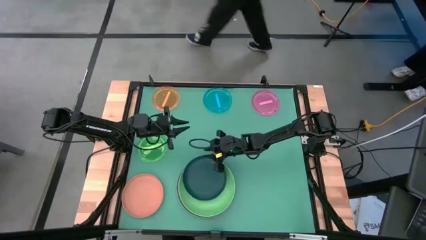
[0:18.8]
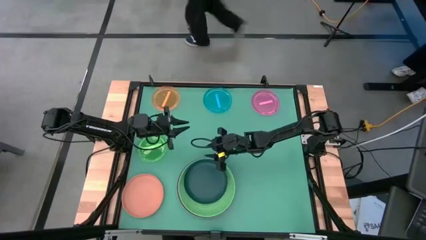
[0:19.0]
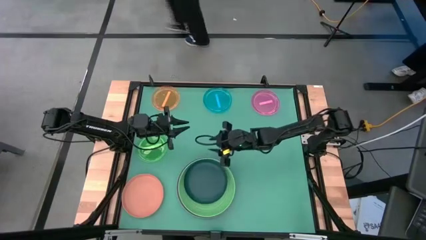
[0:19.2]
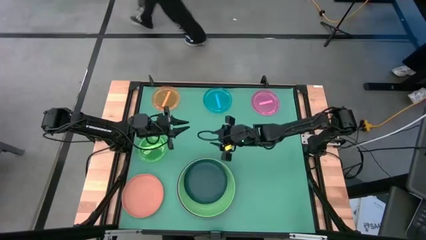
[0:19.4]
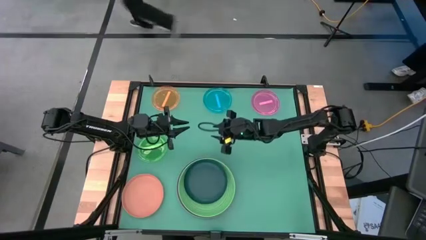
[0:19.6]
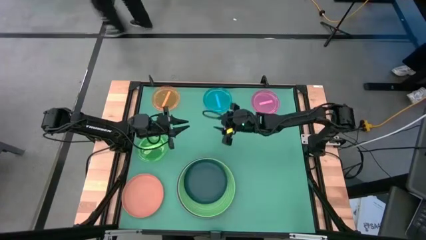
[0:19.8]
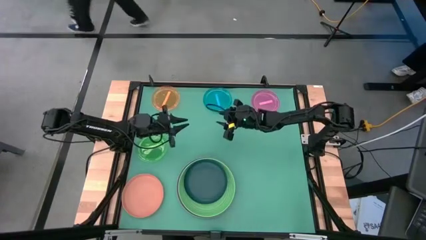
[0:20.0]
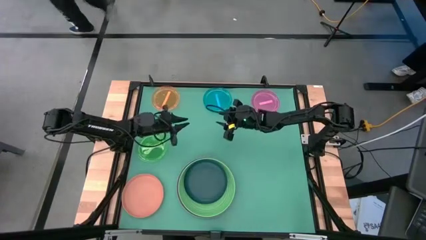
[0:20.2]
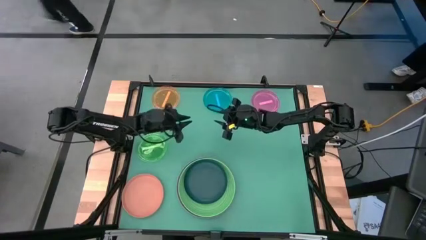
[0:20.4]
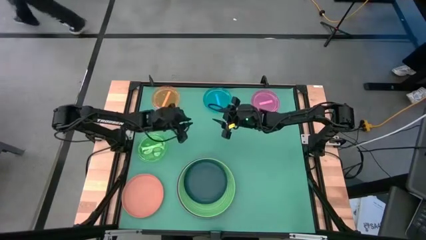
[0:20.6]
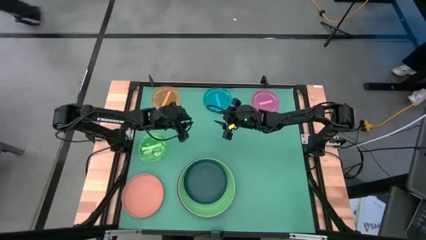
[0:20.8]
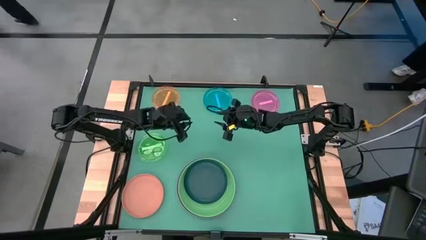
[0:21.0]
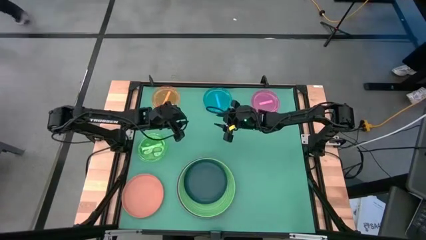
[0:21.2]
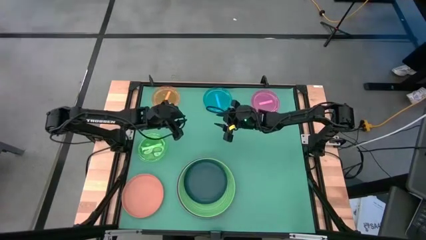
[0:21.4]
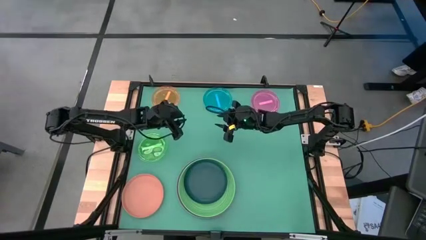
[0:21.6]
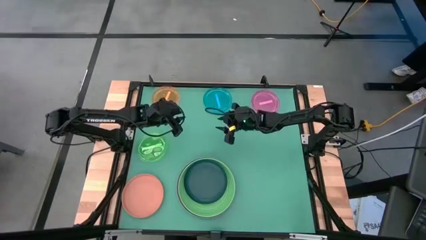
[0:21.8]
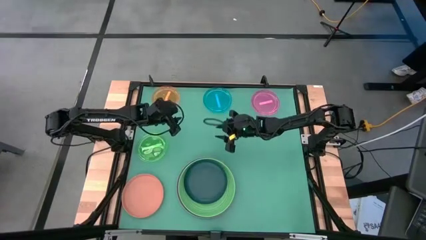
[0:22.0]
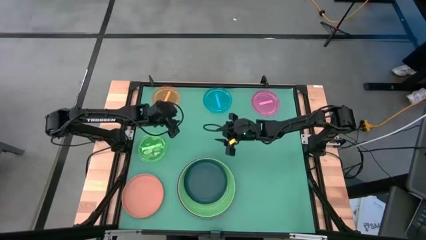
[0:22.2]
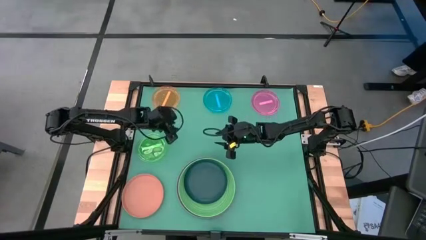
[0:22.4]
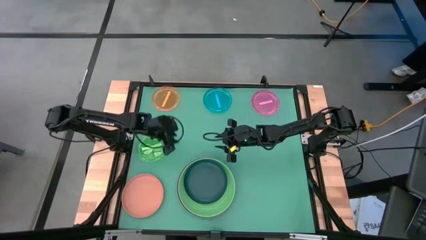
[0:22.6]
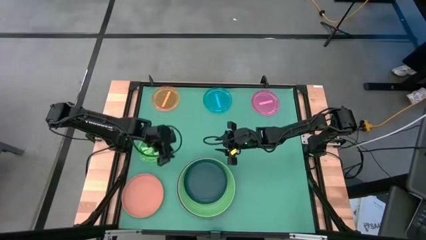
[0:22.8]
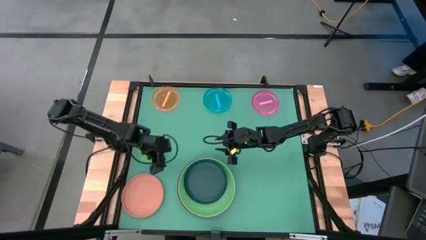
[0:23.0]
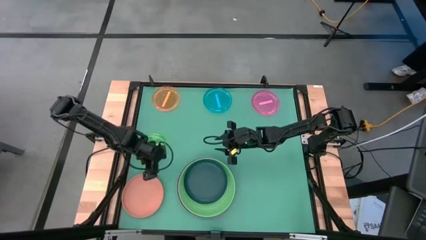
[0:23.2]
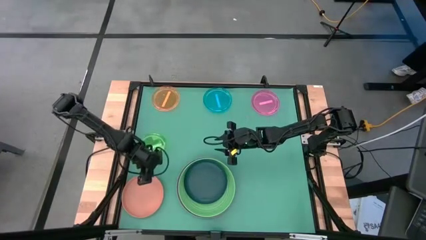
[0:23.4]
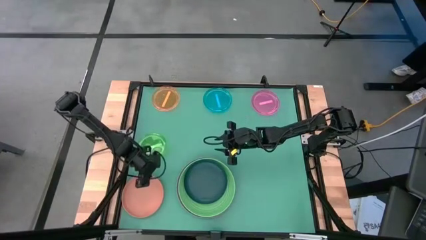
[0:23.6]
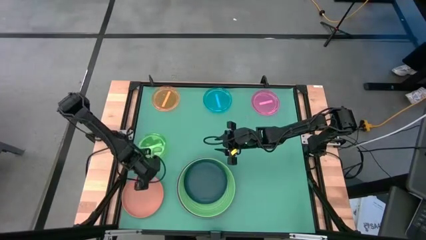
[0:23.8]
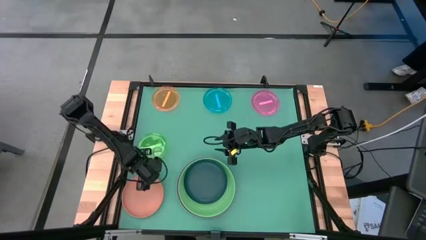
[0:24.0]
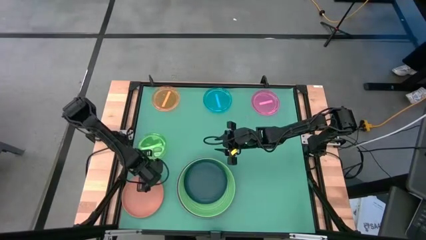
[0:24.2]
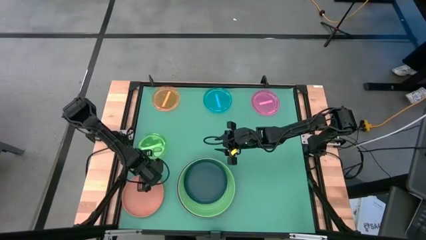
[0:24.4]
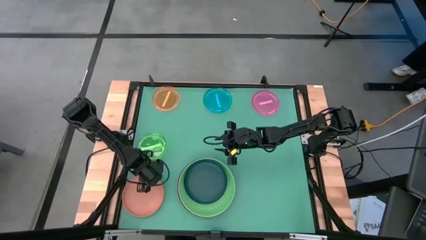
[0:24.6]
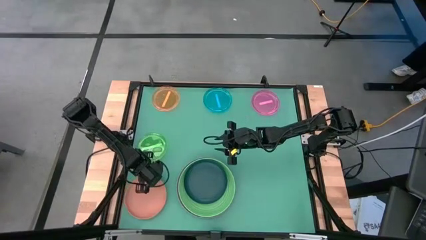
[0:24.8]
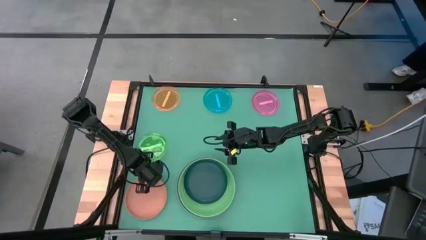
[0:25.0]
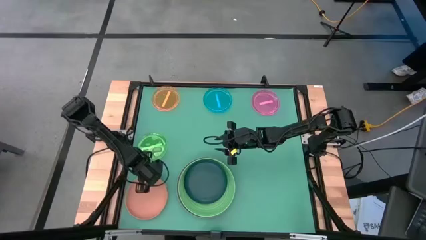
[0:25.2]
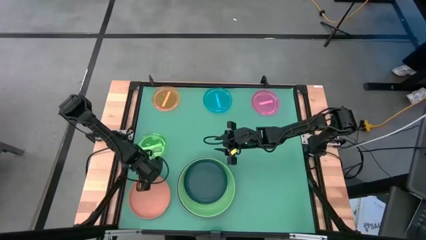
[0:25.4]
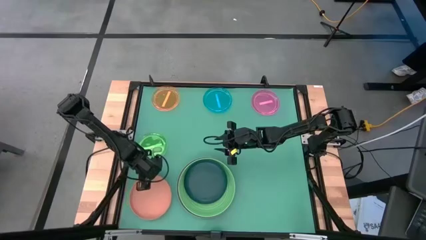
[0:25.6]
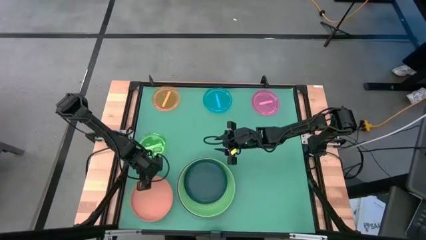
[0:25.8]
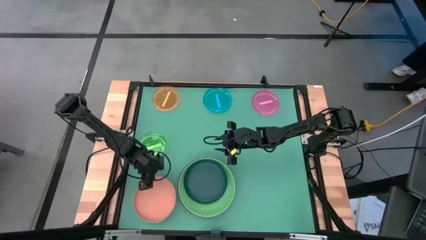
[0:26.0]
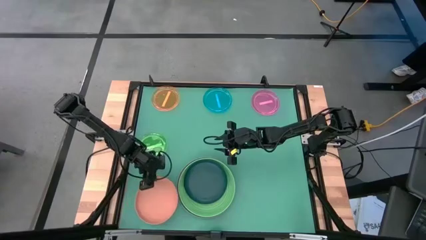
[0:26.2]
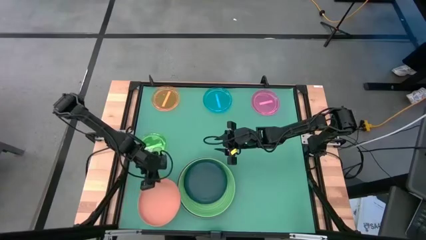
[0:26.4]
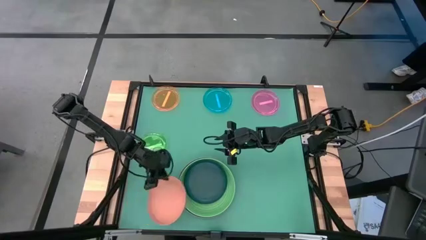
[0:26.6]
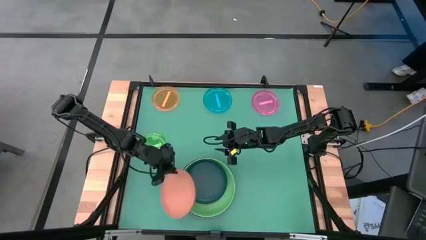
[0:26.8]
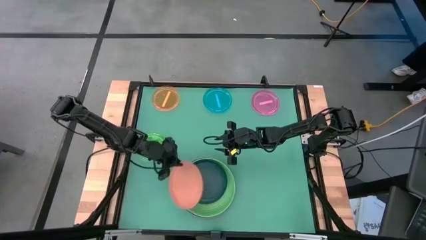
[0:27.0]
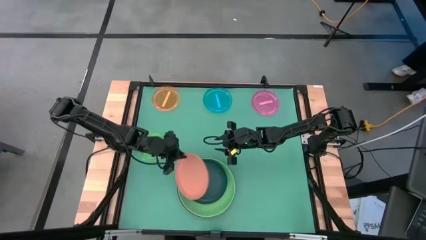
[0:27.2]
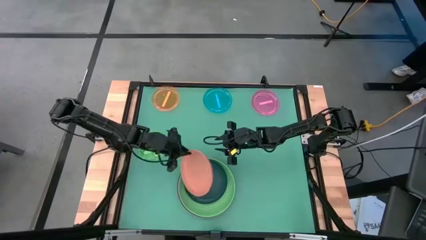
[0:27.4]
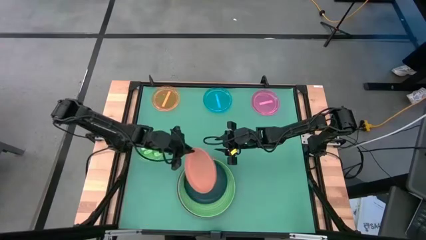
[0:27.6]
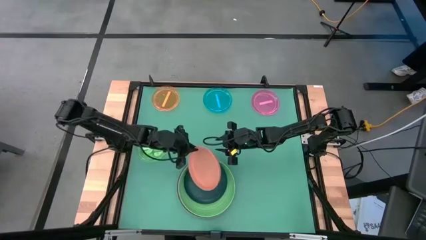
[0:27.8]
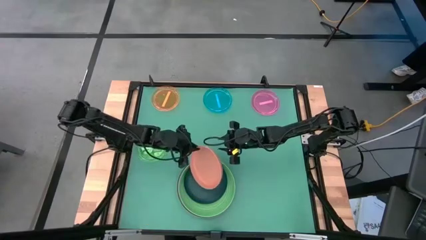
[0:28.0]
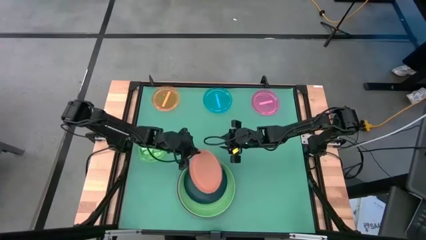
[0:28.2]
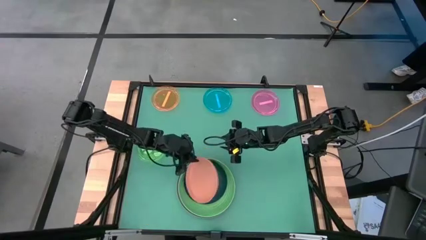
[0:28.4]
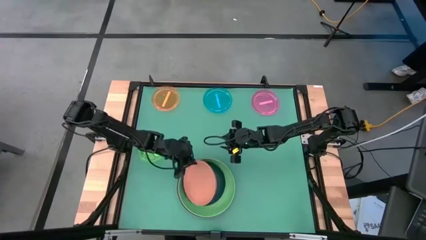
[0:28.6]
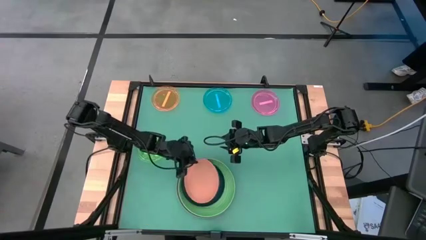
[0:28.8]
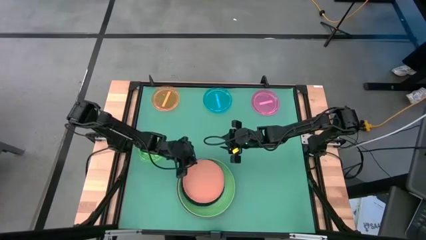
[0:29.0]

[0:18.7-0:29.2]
Task: Stack plastic plates
Stack the orange plate on top of the dark green plate

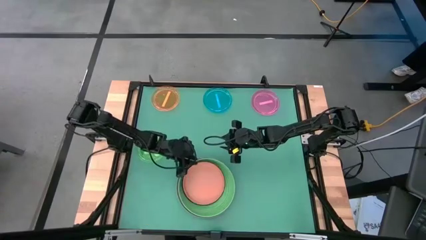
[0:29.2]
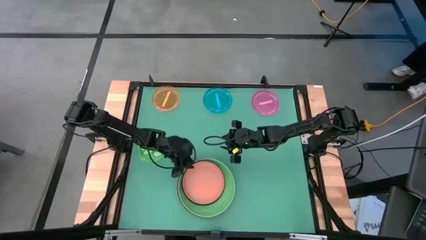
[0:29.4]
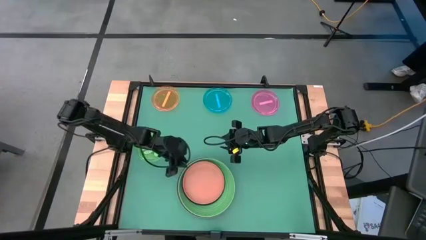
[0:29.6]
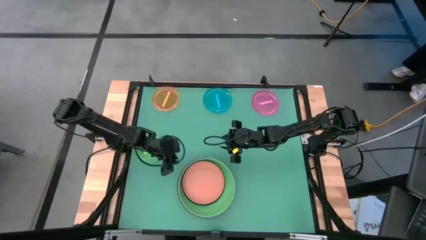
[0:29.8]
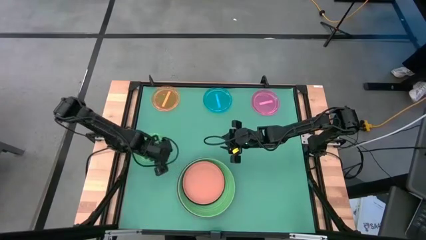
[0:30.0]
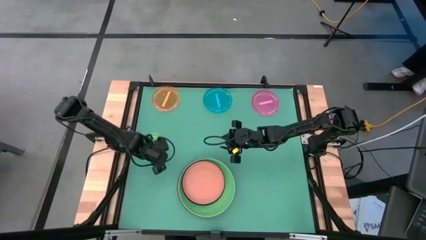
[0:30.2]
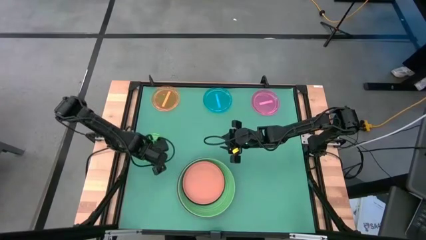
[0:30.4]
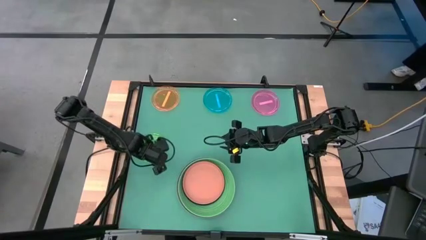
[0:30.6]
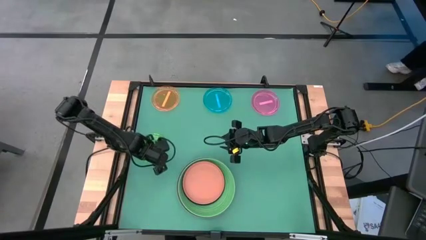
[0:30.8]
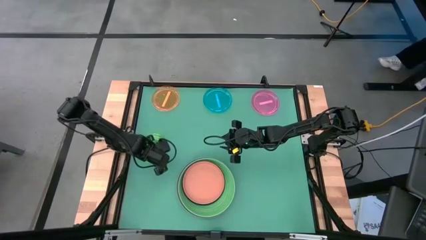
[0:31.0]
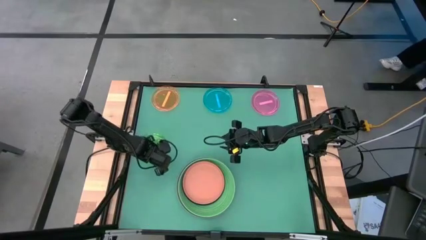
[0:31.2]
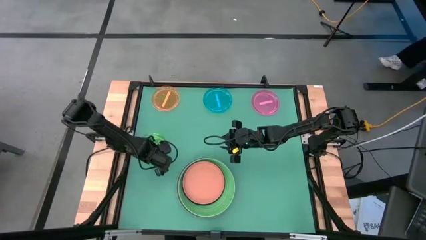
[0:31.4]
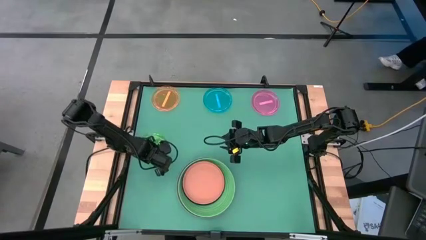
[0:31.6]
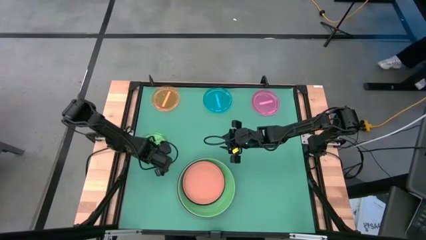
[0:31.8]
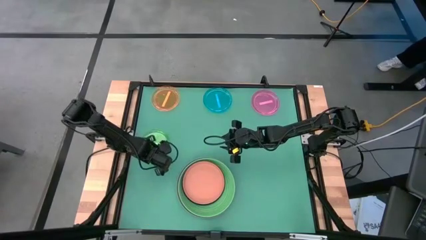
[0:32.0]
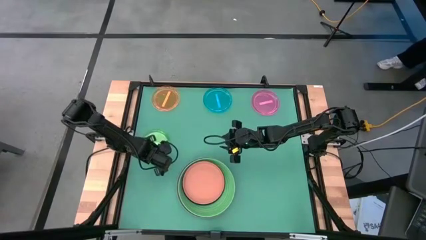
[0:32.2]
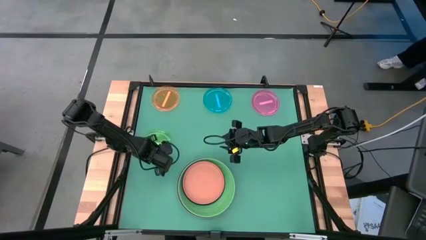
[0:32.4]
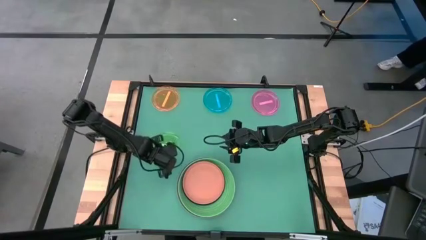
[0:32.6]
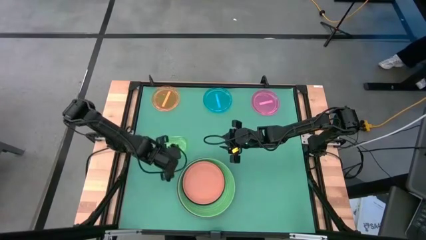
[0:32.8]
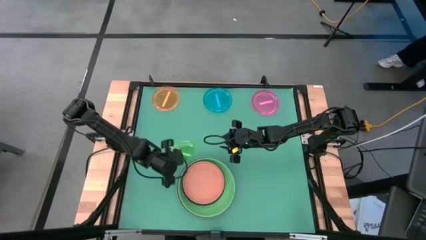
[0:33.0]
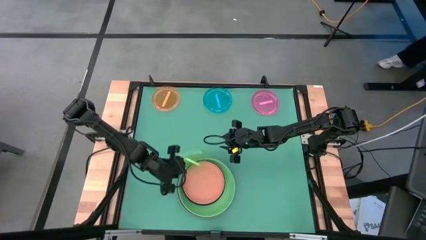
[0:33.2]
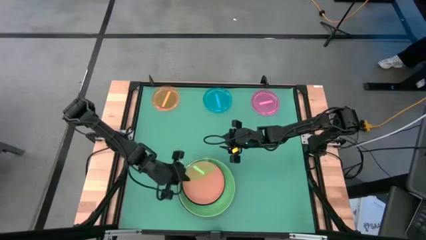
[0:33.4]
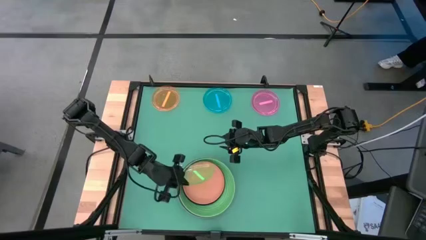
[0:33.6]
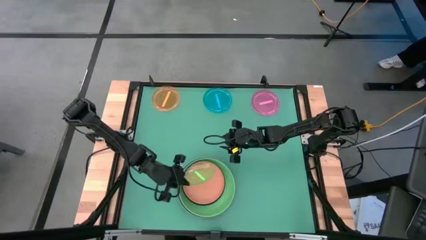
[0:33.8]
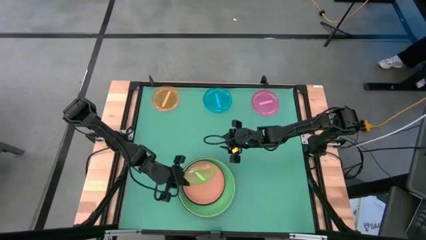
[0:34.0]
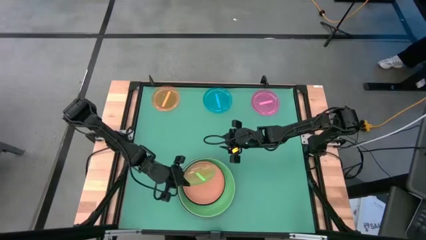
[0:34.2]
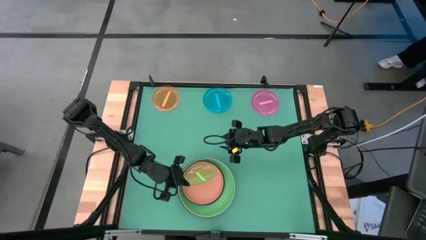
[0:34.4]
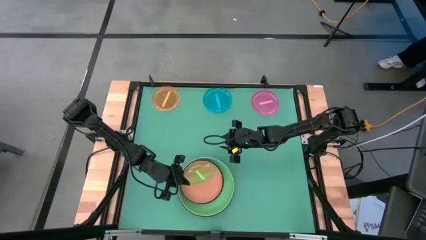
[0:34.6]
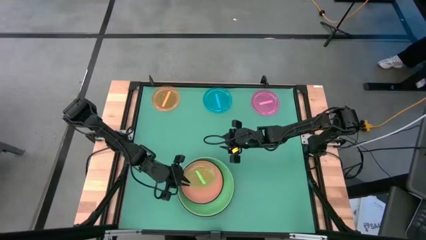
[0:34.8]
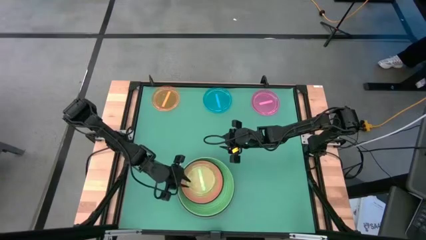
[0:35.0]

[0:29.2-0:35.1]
Stack the transparent green plate on top of the orange plate
